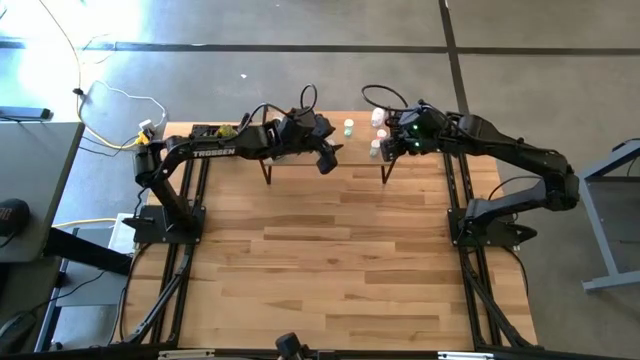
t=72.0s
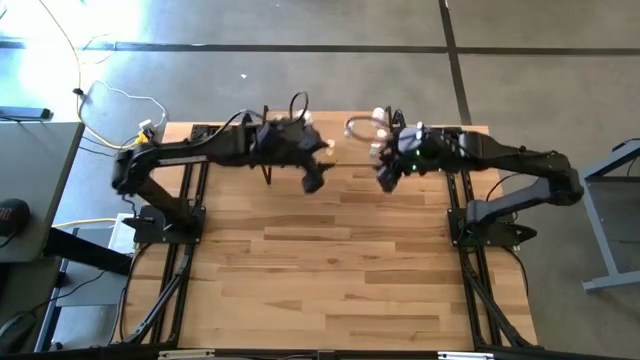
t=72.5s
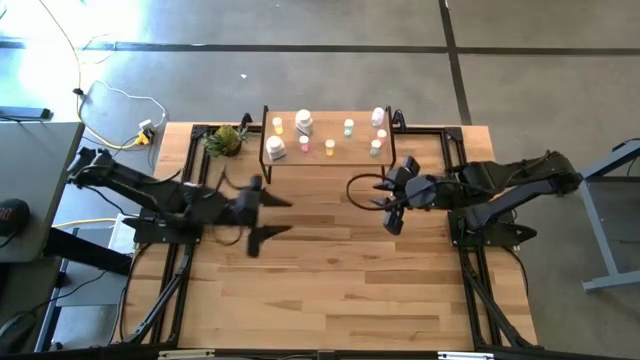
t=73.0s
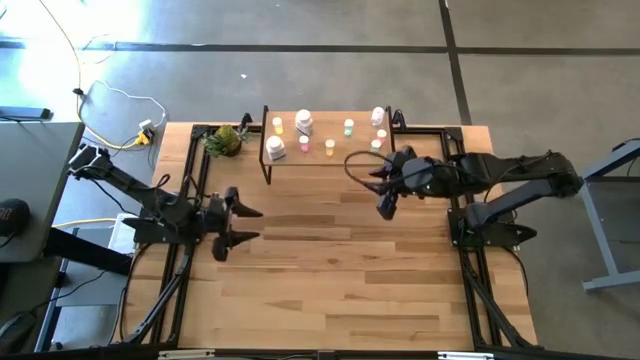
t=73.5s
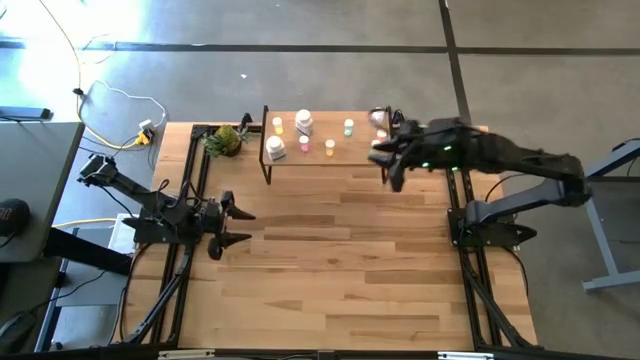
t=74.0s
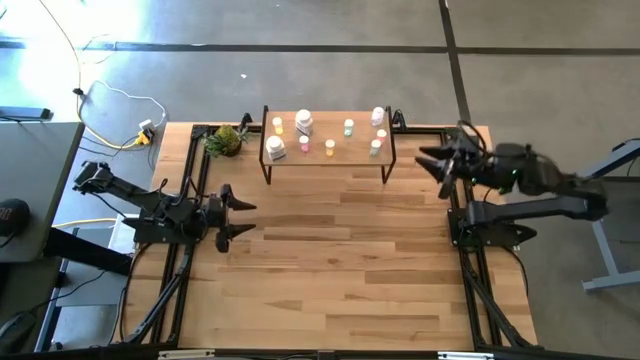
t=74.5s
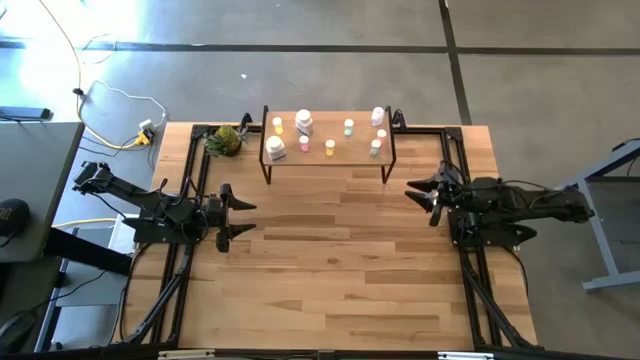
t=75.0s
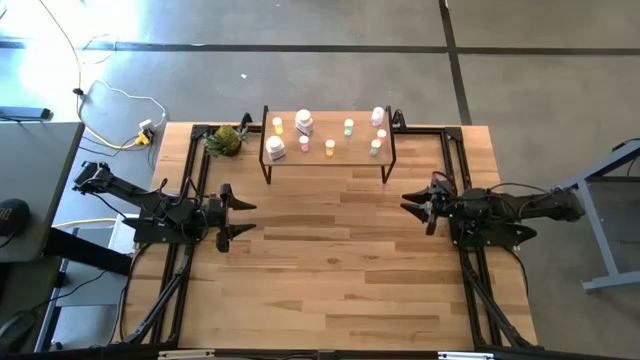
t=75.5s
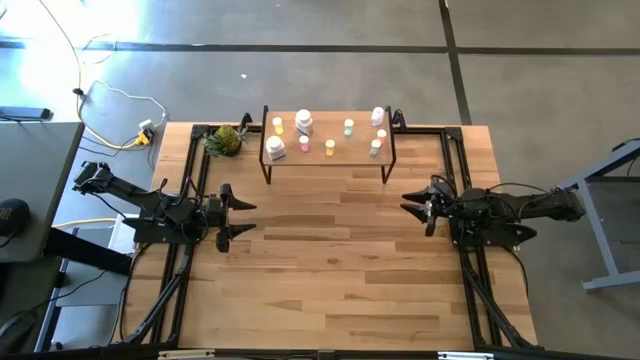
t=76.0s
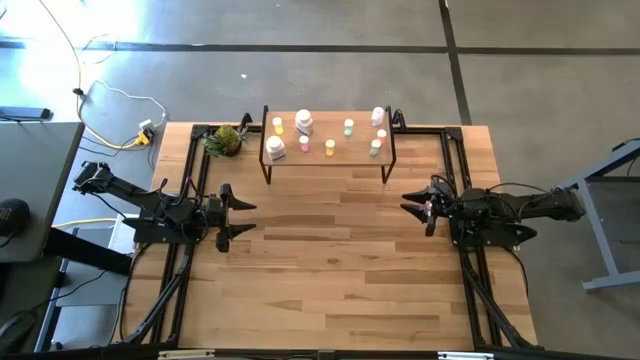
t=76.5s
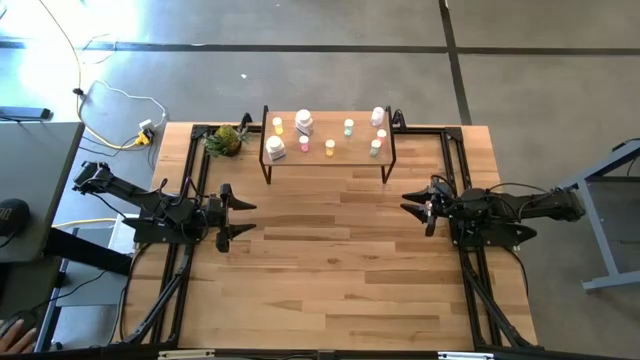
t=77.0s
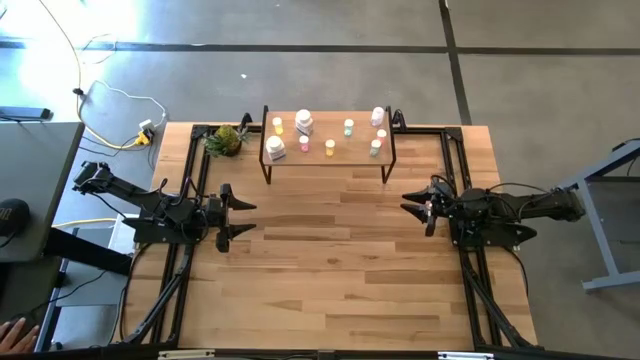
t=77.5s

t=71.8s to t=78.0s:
Task: Pick and place medicine bottles onto shelf by color
Return To Home Position

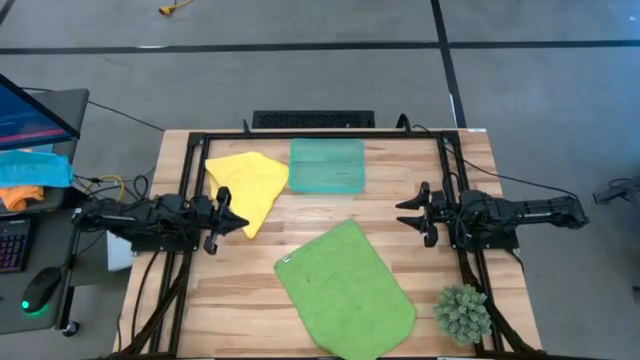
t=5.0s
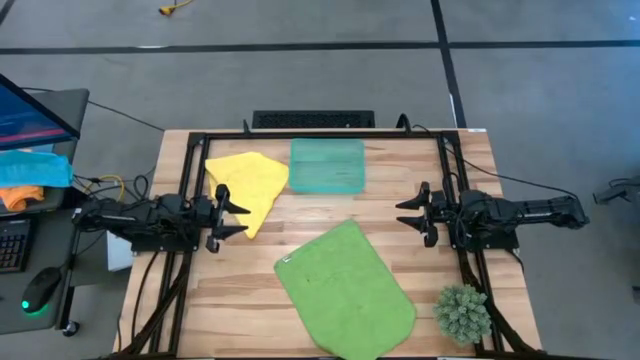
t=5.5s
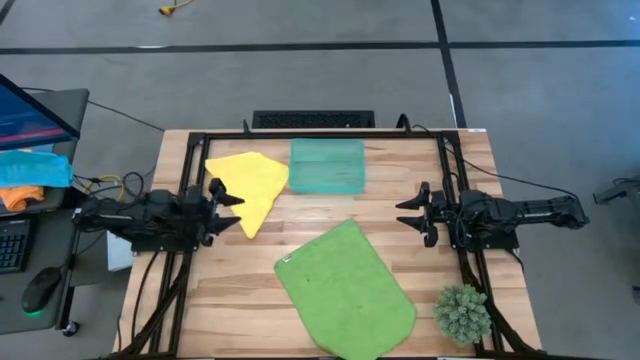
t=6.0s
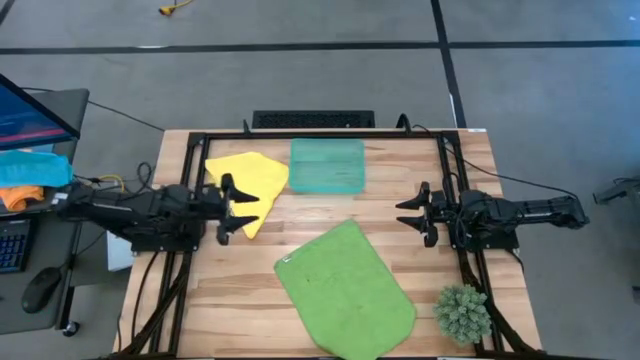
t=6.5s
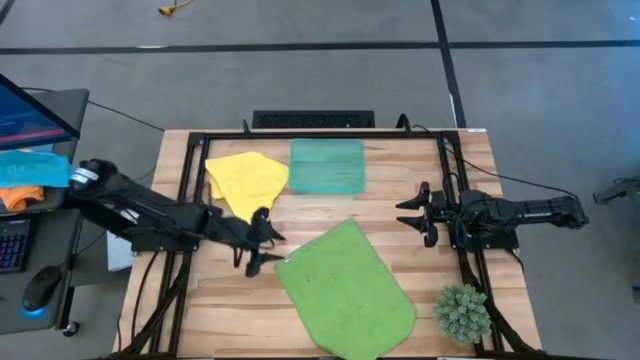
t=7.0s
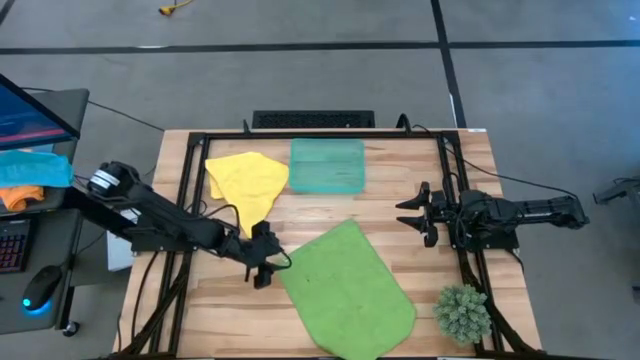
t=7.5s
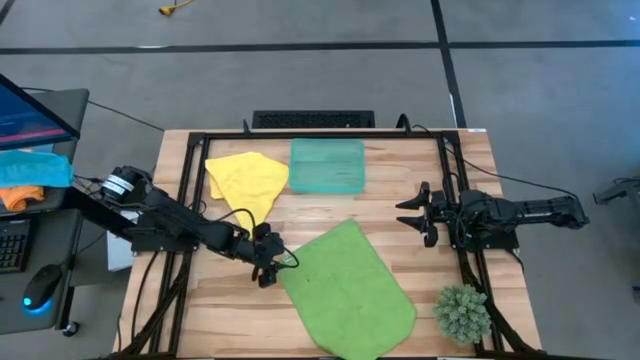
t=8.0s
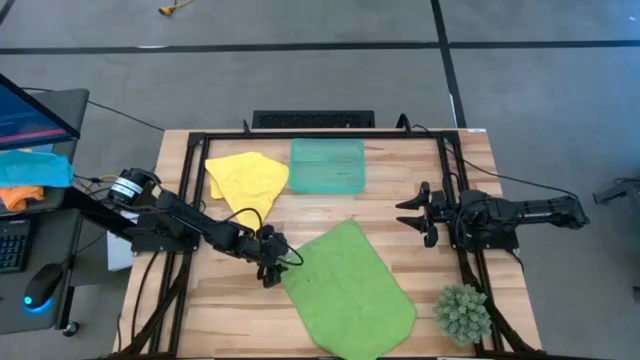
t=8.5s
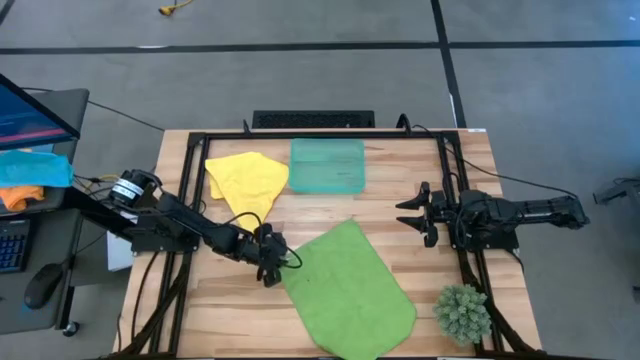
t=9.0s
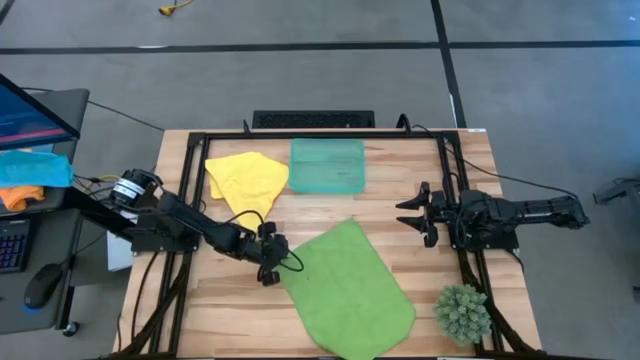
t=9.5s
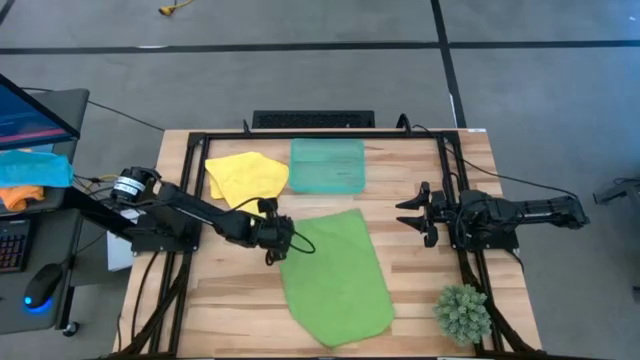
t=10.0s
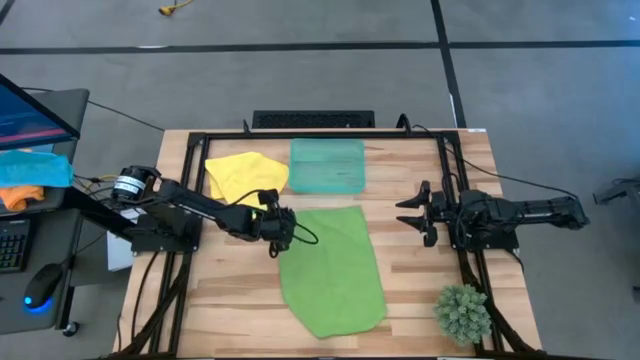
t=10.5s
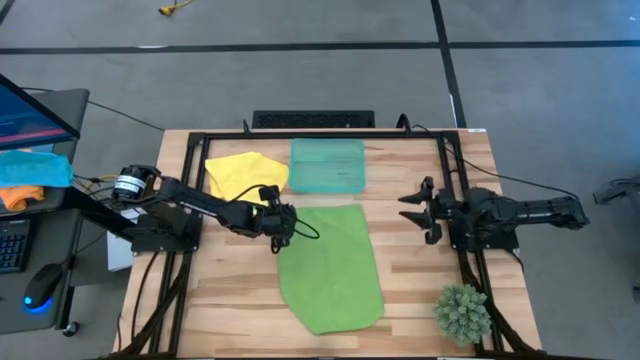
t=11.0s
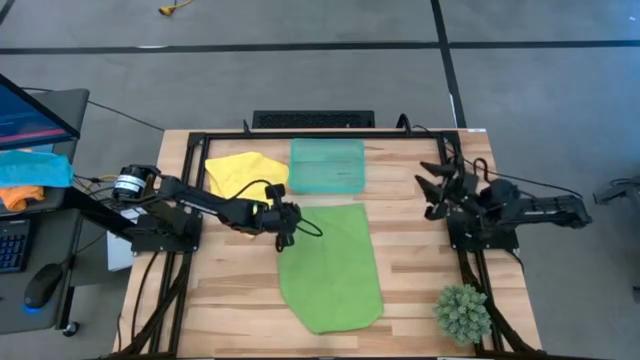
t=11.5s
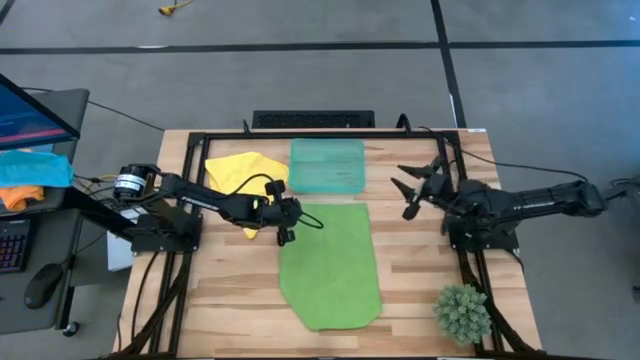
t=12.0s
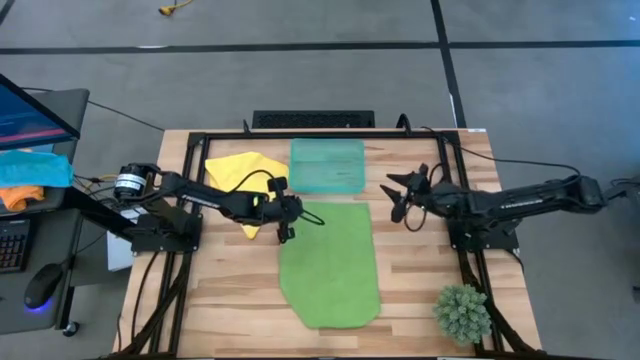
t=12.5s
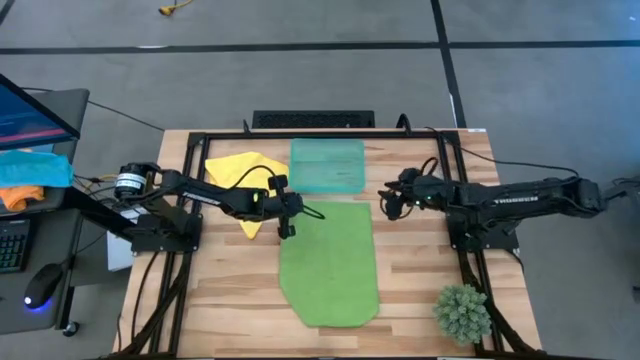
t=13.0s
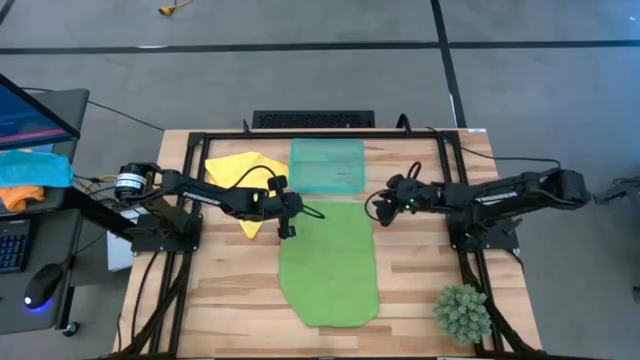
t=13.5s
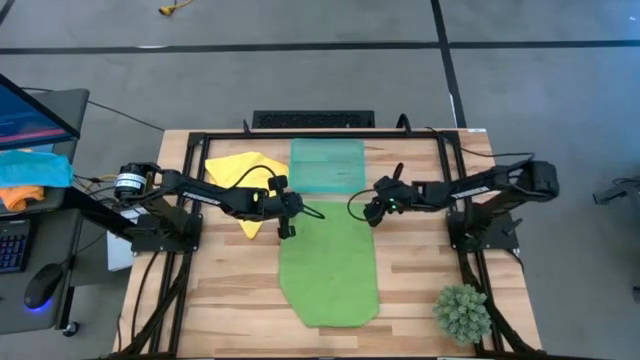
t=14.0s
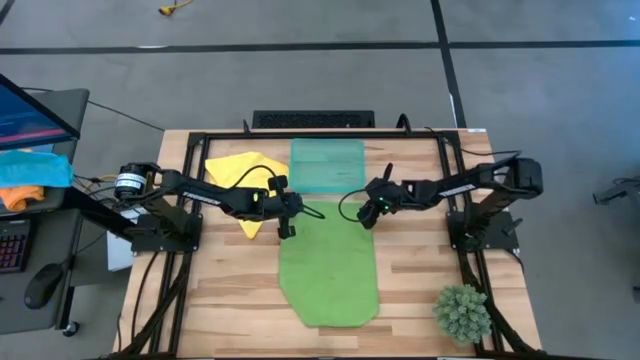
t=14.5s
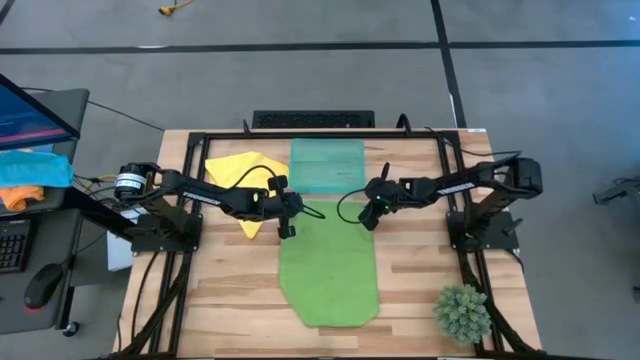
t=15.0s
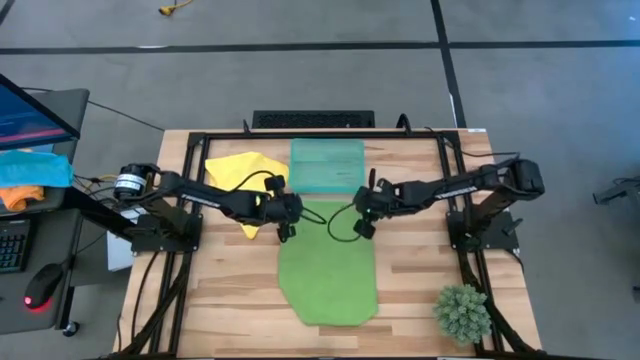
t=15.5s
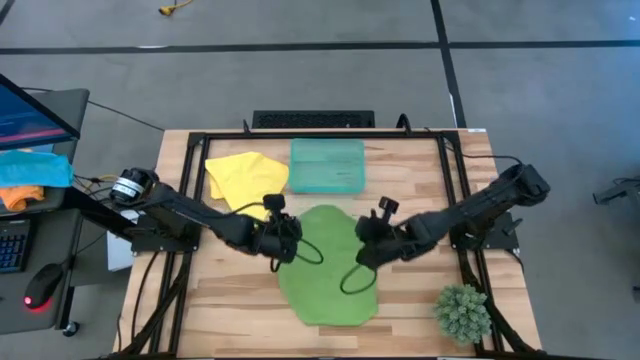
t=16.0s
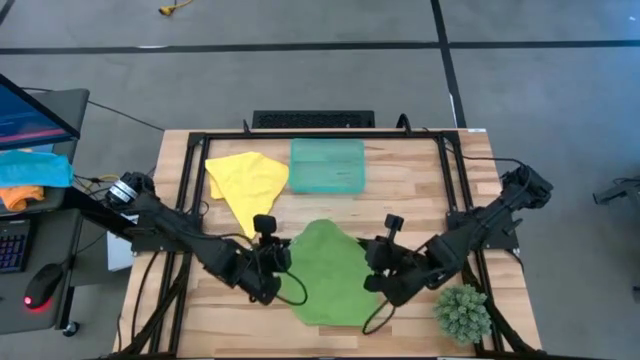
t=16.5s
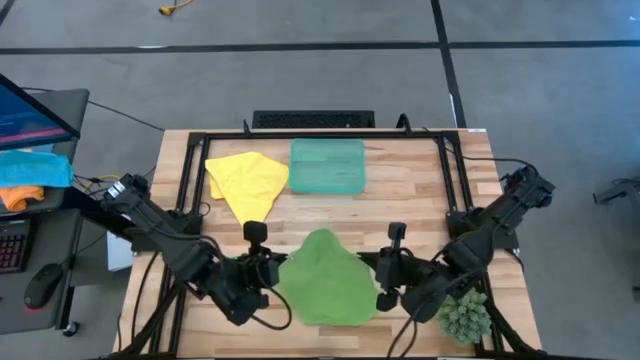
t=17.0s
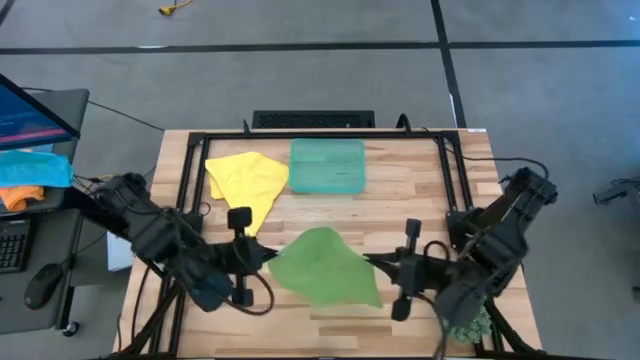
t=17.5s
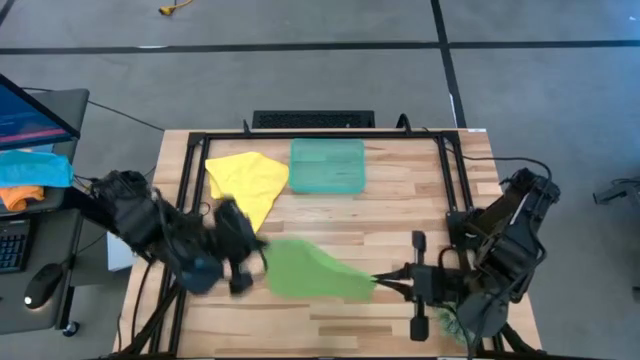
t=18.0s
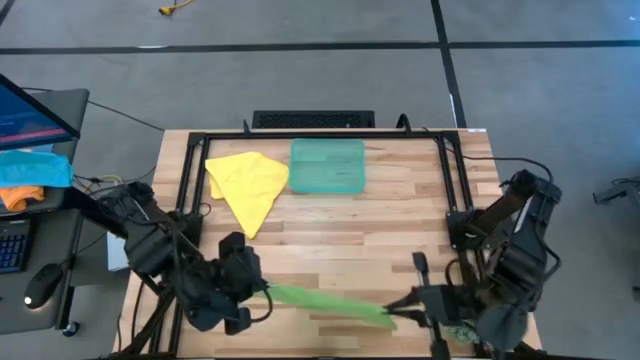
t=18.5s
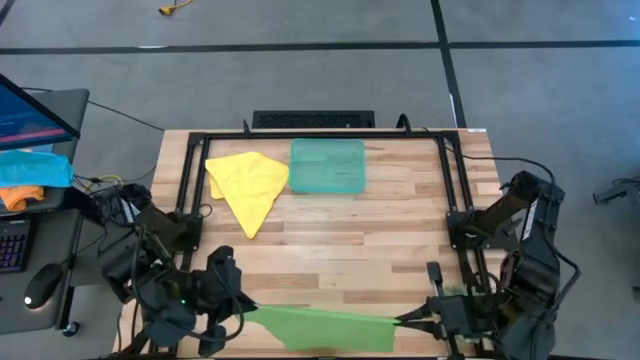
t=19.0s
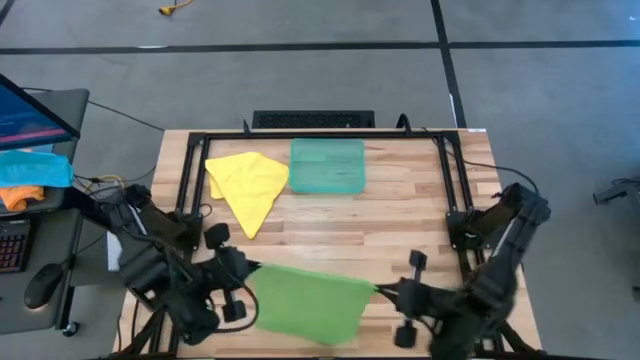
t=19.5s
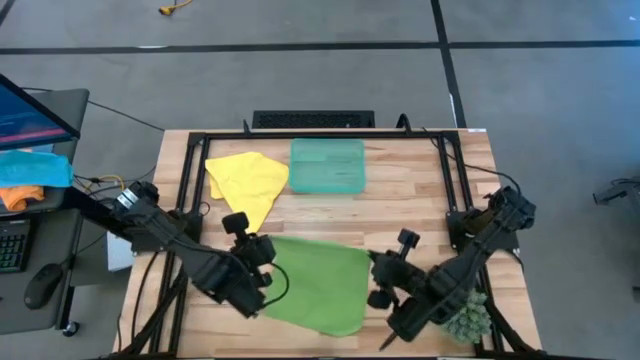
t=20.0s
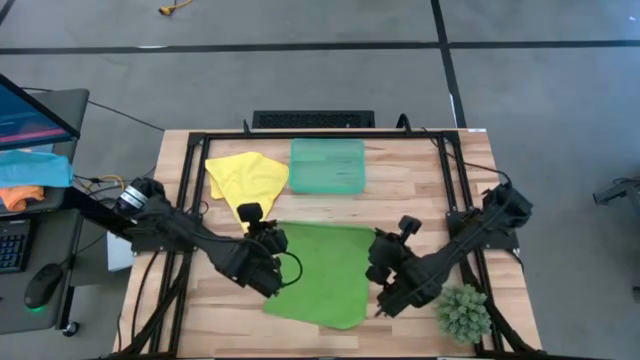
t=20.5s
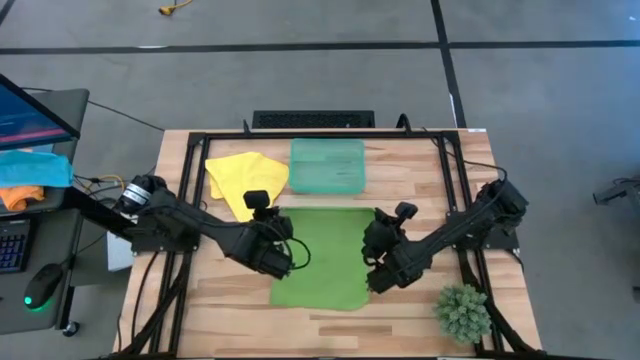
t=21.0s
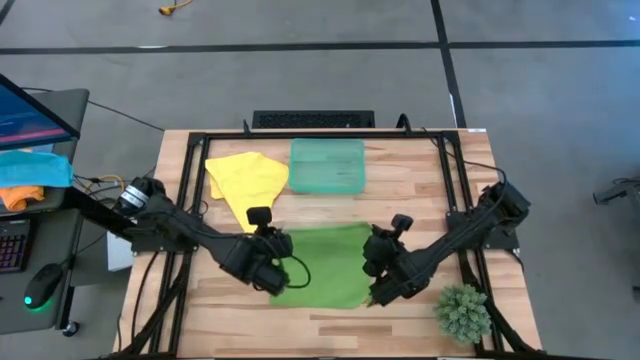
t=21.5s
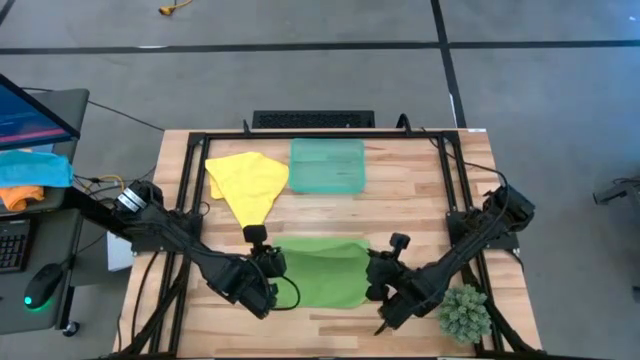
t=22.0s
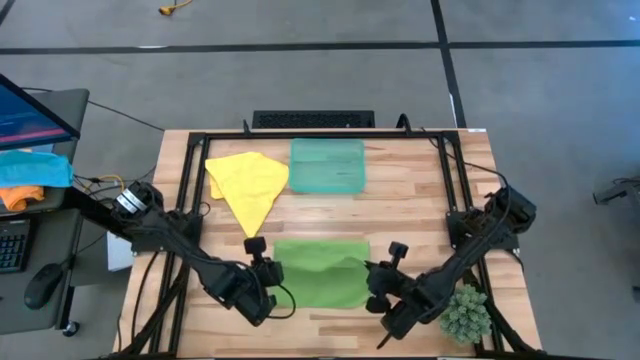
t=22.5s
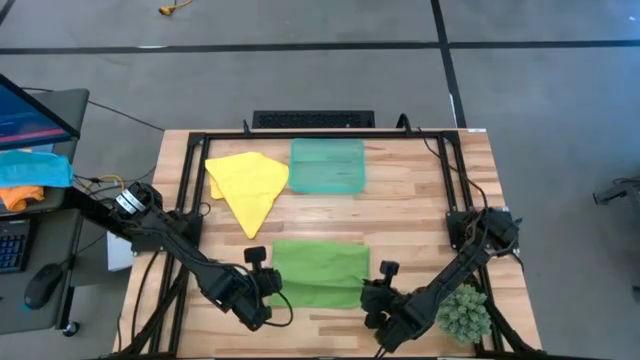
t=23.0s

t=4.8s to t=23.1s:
Task: Roll microfiber towels into tight, uniform cylinder then place into a basket
Fold green microfiber towel
